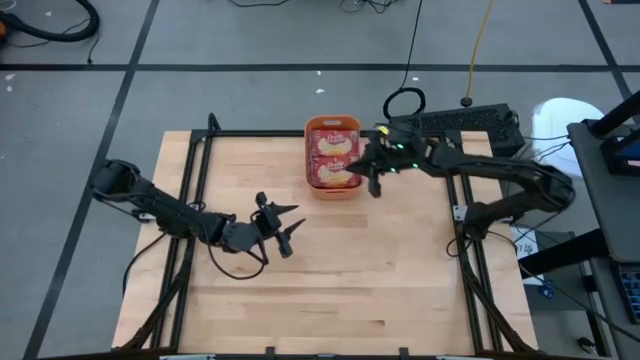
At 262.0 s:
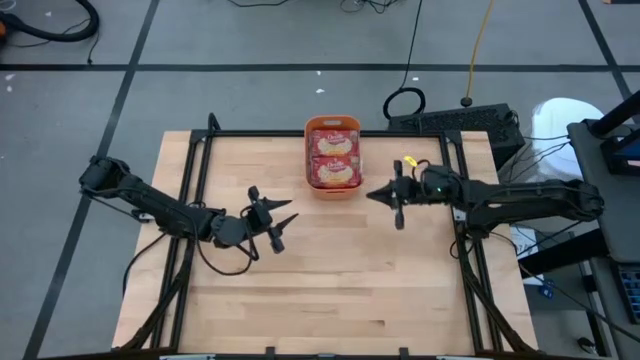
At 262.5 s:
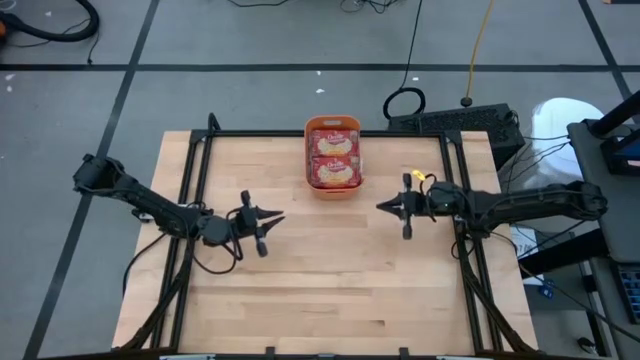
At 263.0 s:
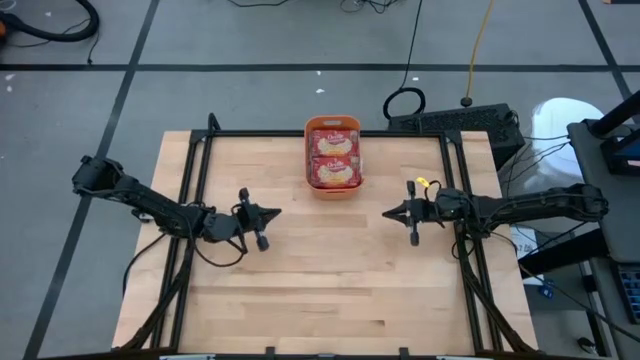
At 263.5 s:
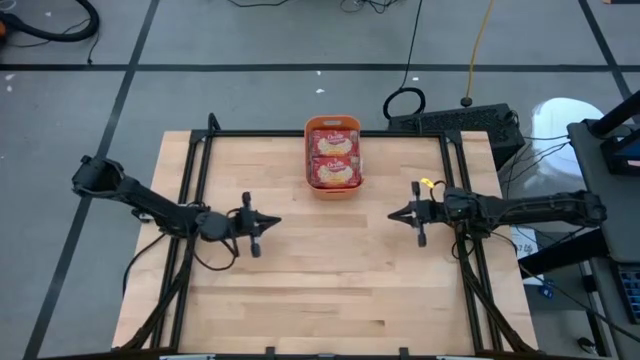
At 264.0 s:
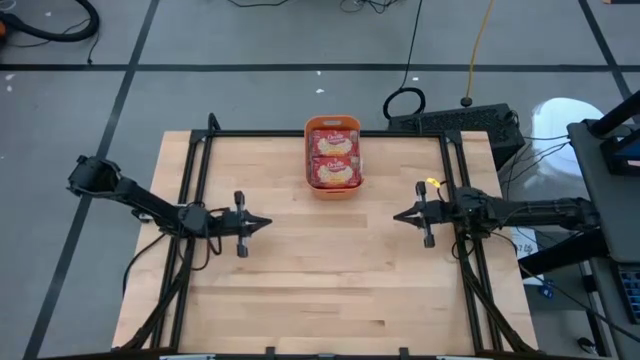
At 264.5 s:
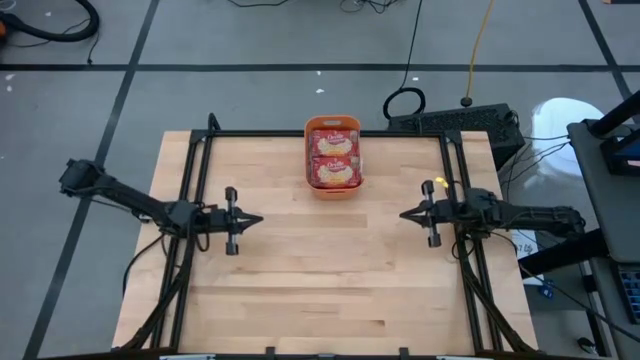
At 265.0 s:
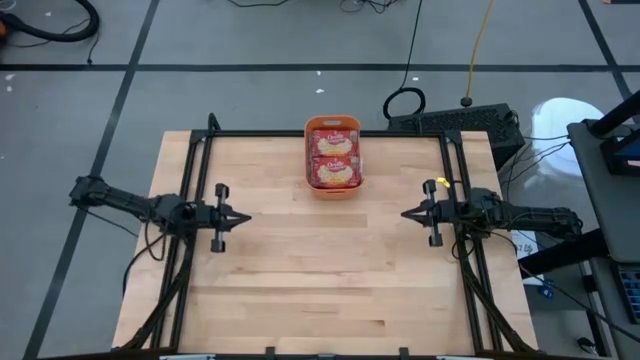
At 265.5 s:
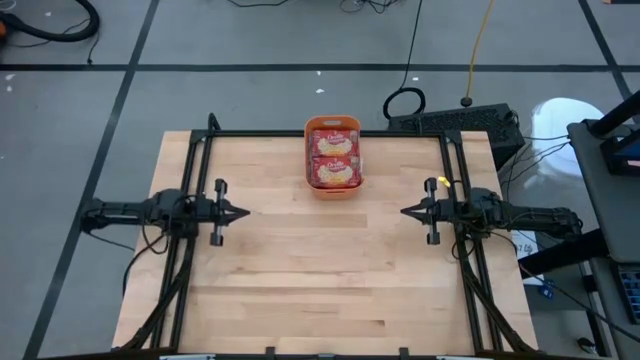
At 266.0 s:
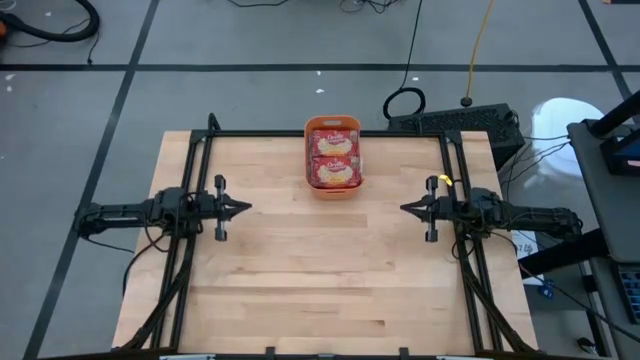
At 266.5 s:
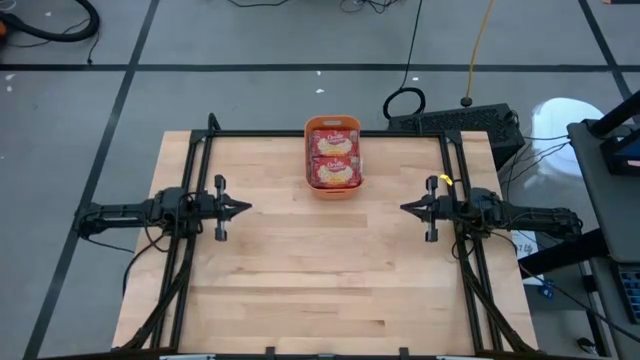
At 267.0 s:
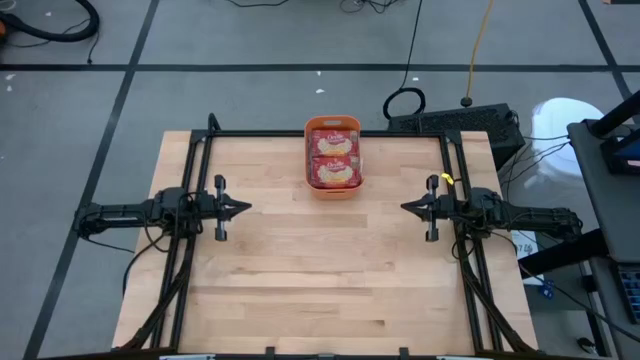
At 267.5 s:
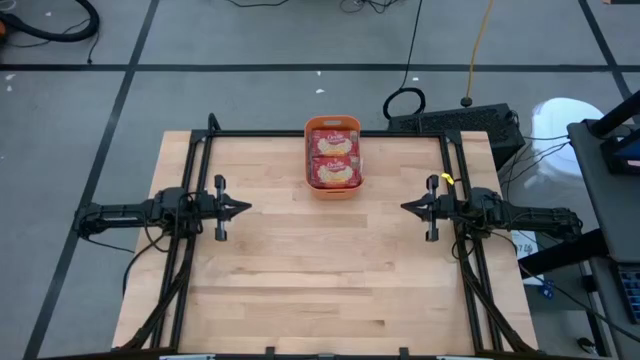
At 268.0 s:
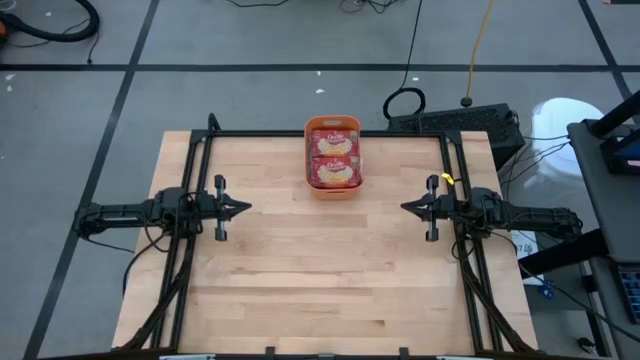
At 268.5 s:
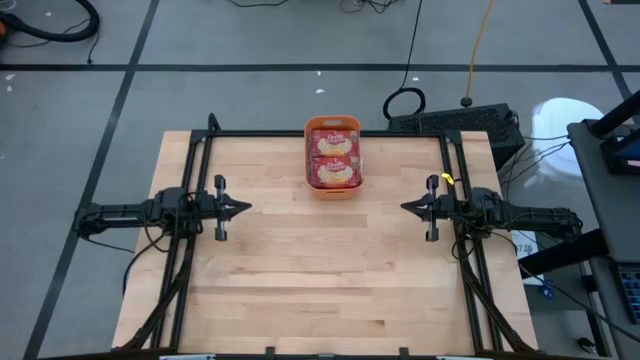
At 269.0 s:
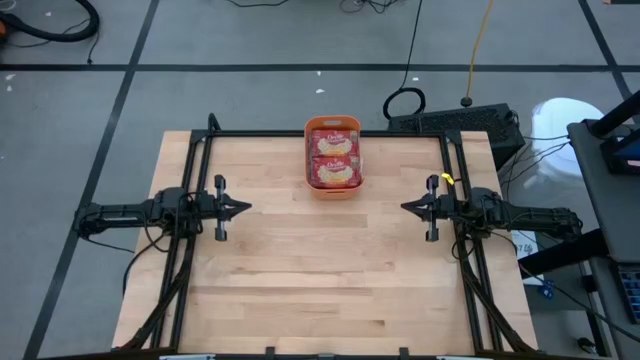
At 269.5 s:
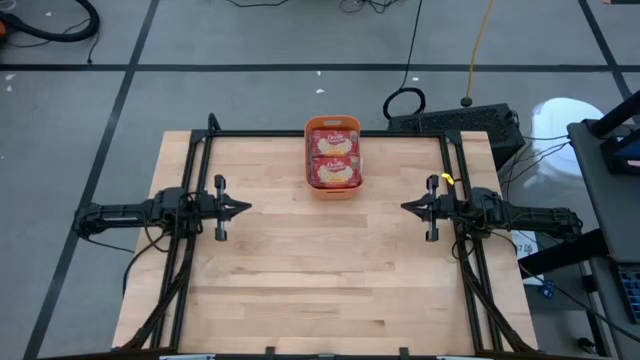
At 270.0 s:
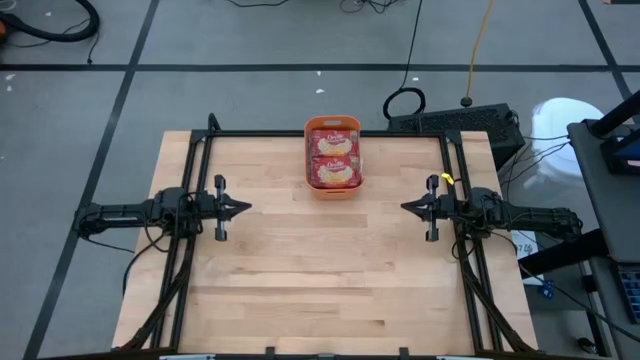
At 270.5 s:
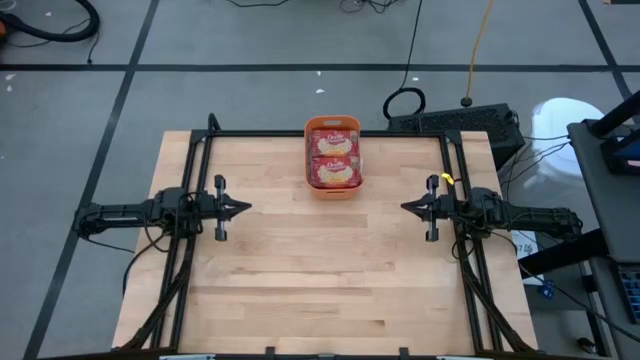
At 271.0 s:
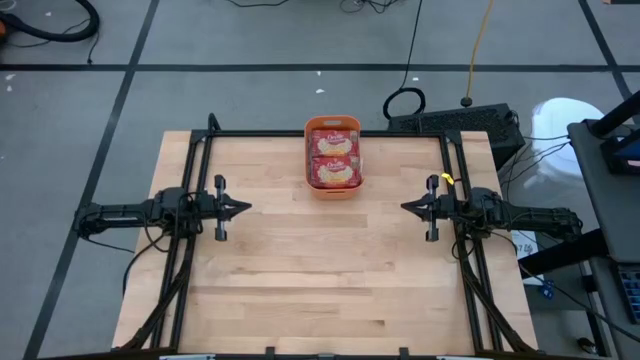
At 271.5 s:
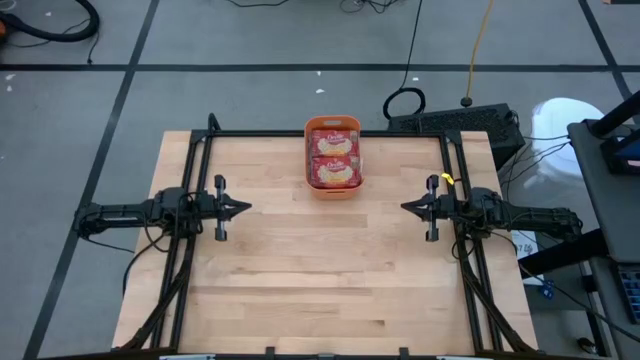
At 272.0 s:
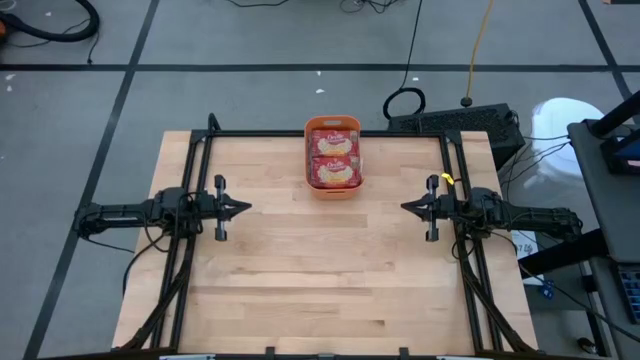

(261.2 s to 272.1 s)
Task: Sort popcorn bags into baskets
Return to Home Position

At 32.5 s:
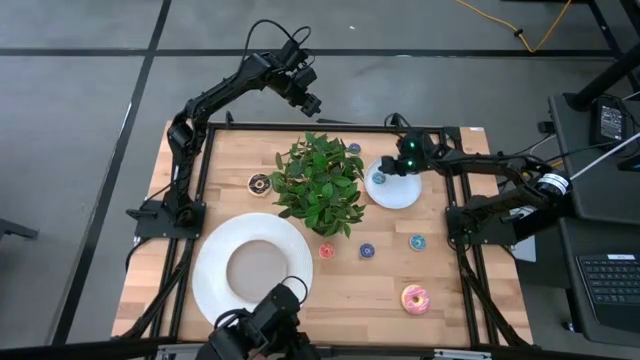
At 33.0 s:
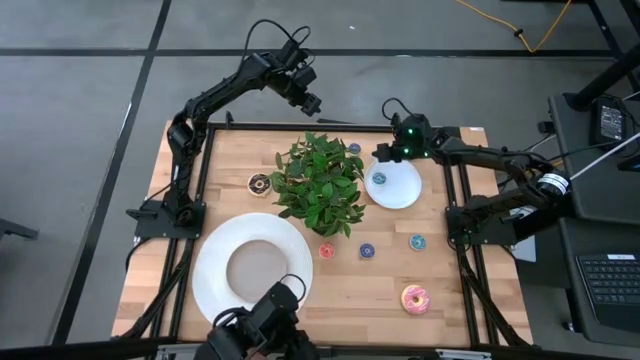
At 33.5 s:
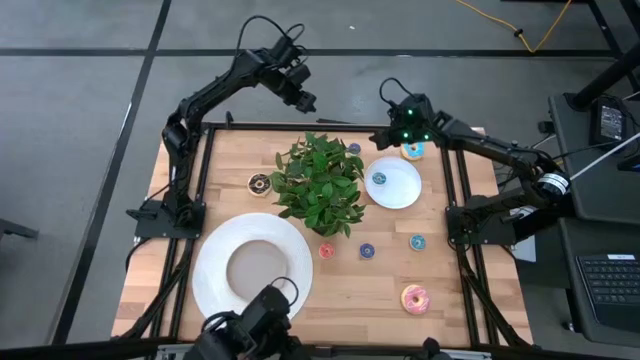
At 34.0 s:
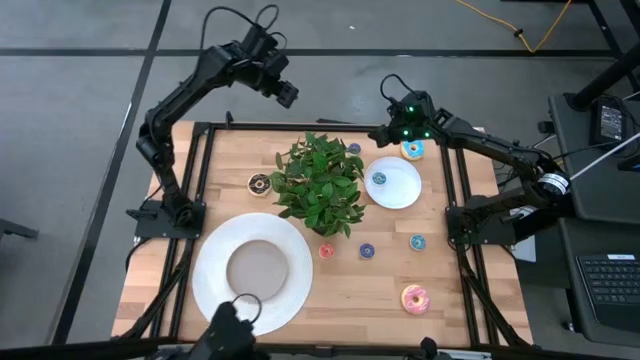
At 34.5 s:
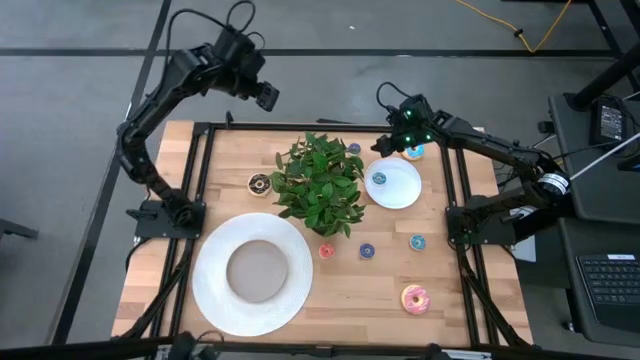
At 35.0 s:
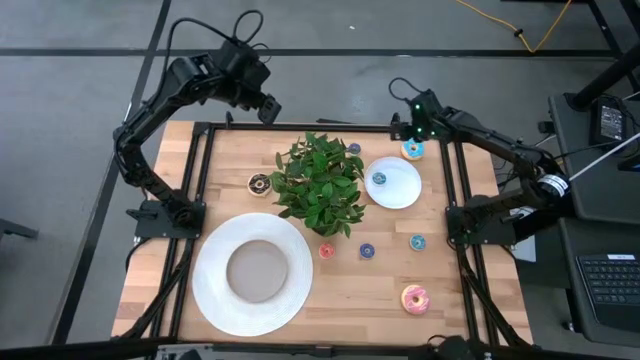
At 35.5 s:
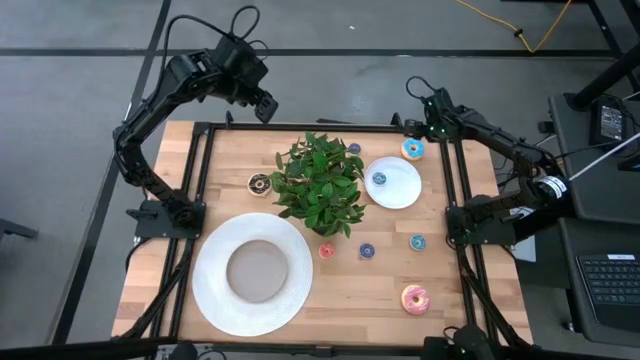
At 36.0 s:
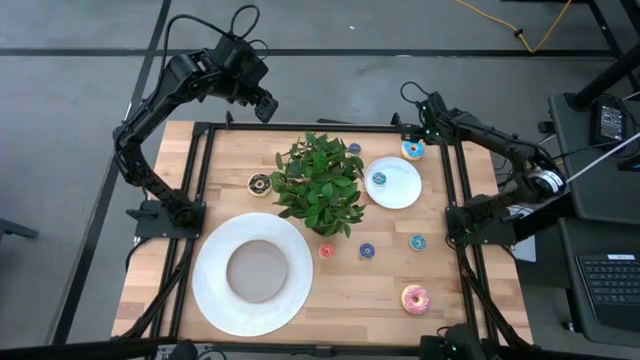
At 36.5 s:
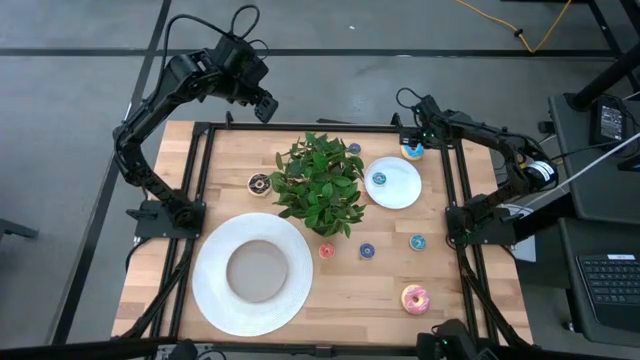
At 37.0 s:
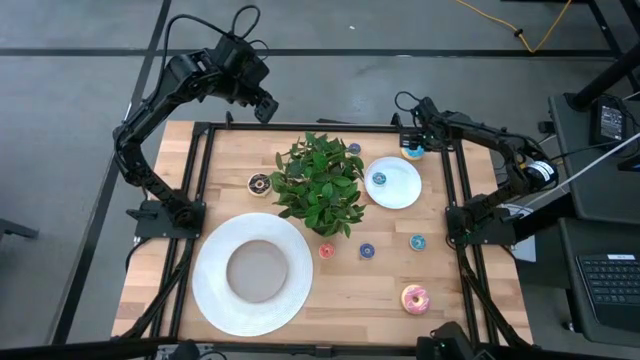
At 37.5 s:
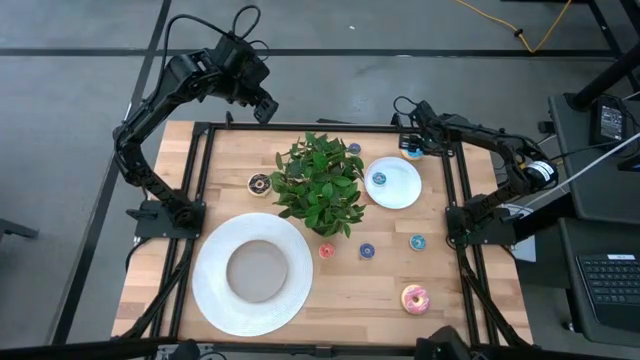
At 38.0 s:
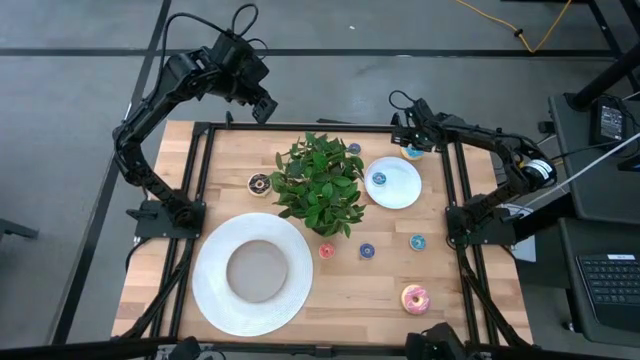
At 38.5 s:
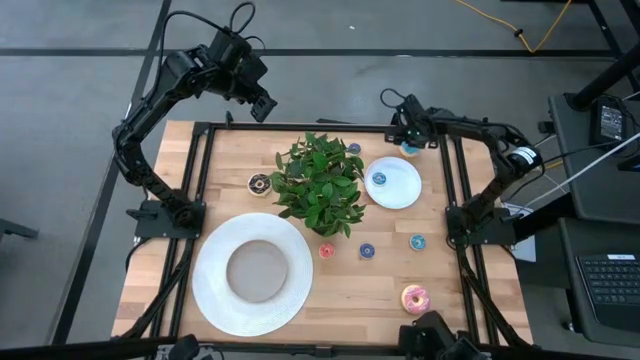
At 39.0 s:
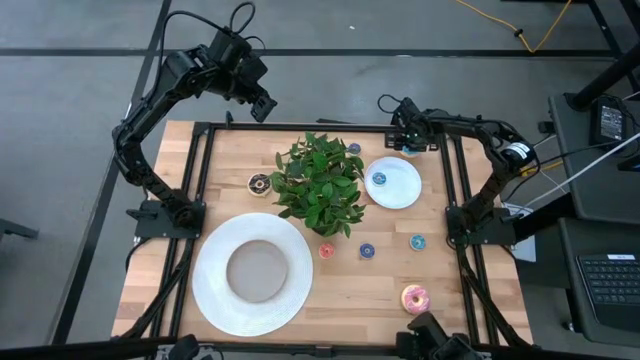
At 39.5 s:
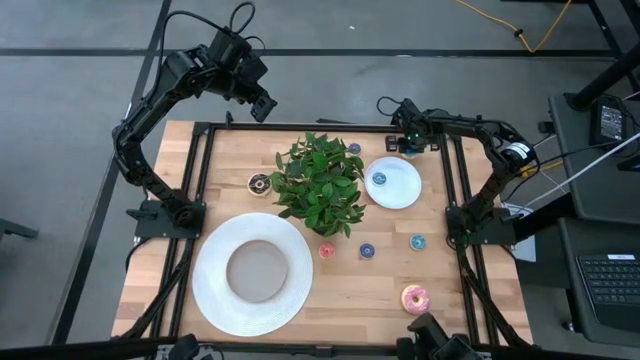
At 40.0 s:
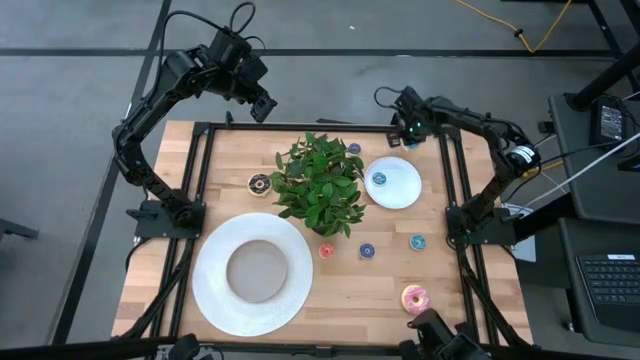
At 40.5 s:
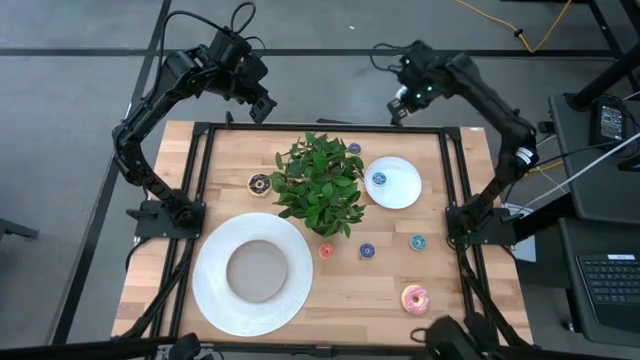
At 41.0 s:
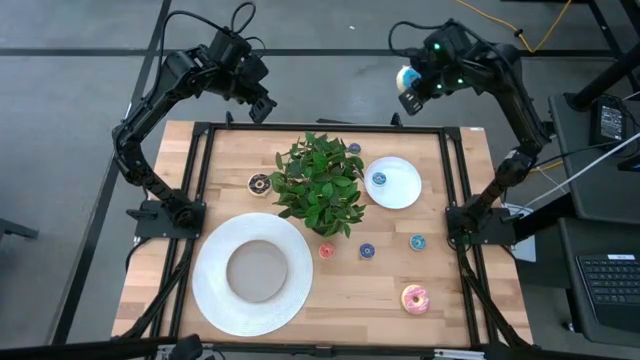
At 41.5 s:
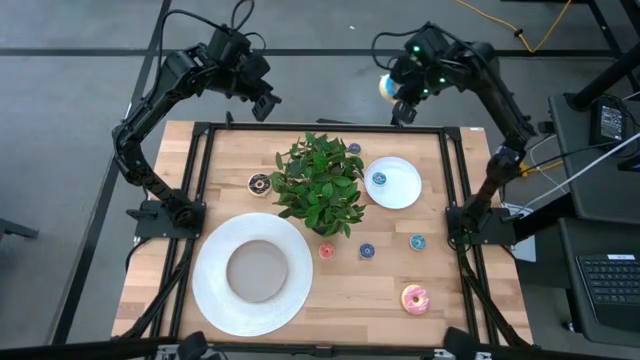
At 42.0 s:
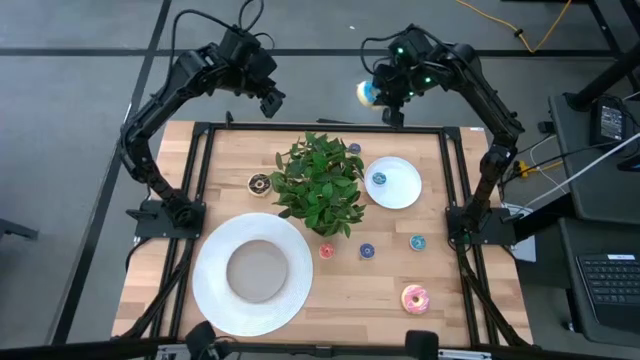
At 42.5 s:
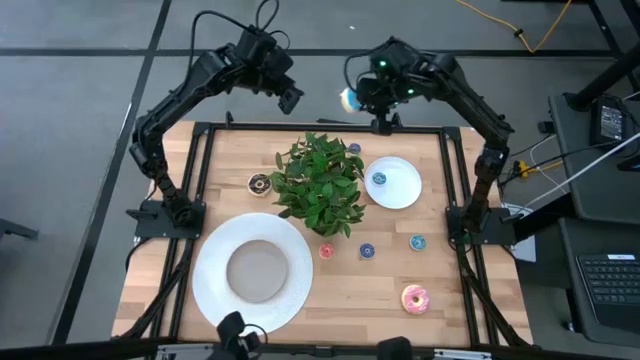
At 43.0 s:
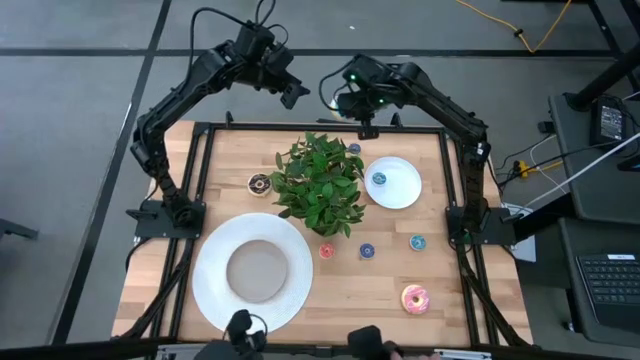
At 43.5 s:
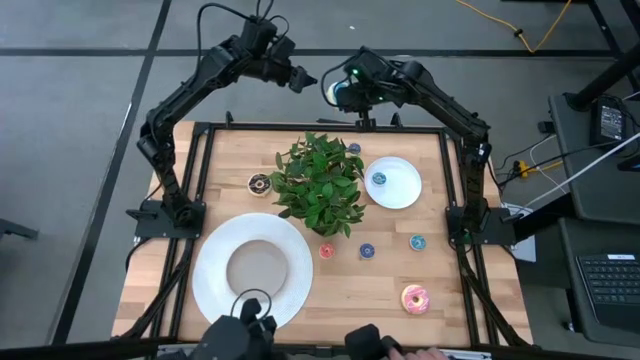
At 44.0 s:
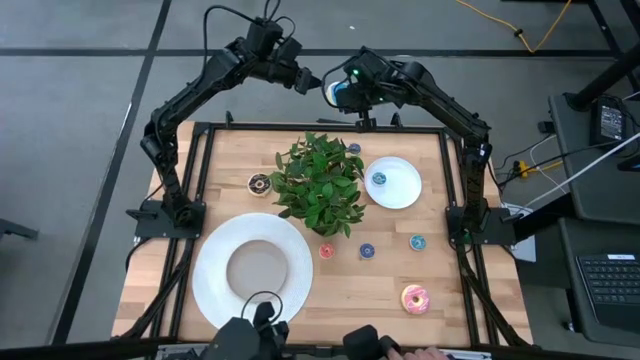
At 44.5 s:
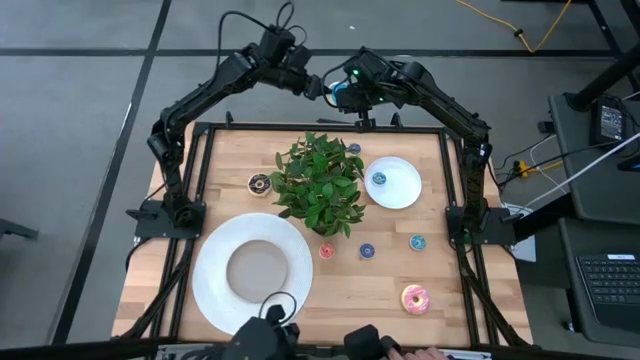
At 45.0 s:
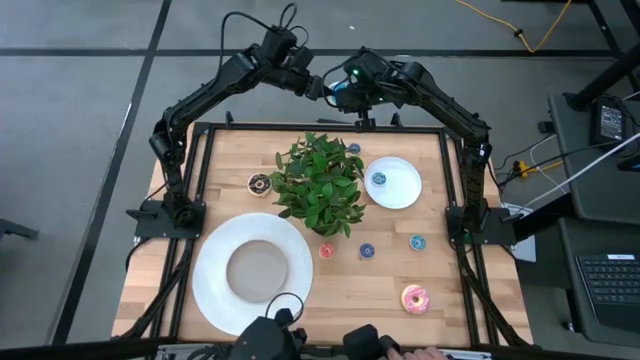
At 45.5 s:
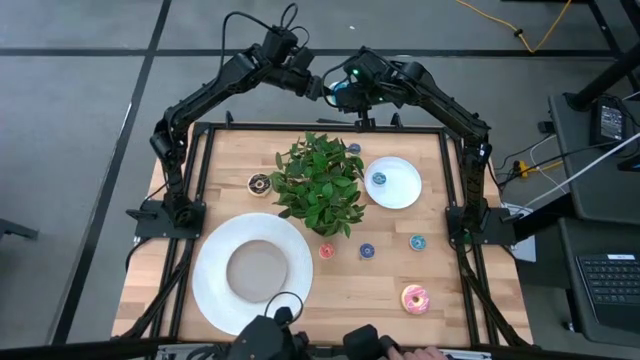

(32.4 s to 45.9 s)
Task: Pick & Place donuts
Put the large light blue donut on the brown plate
